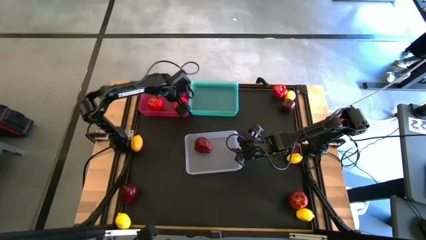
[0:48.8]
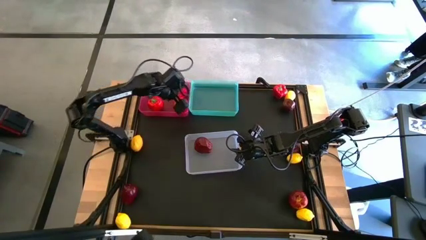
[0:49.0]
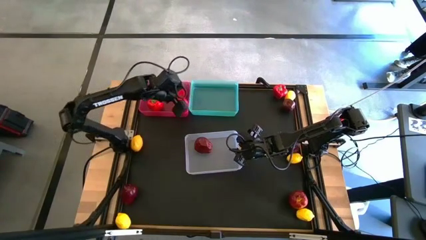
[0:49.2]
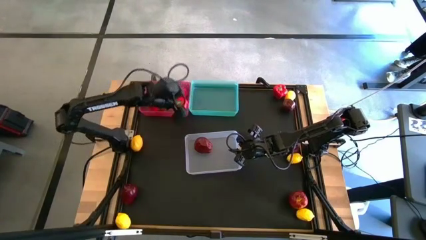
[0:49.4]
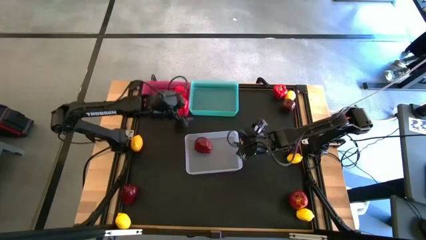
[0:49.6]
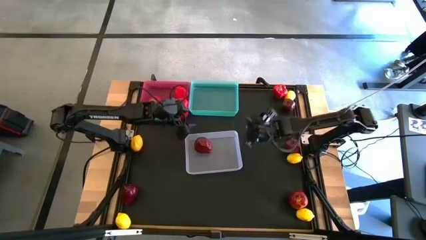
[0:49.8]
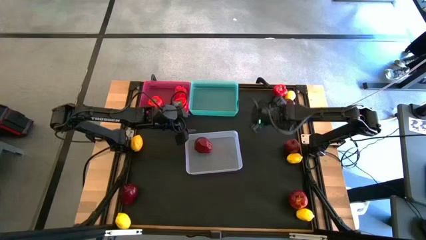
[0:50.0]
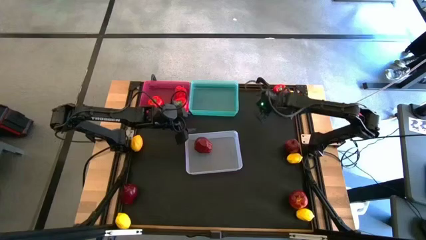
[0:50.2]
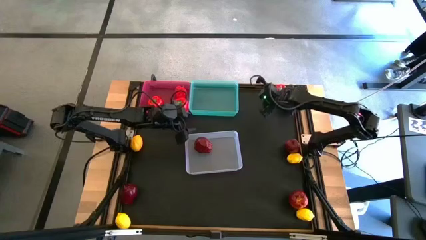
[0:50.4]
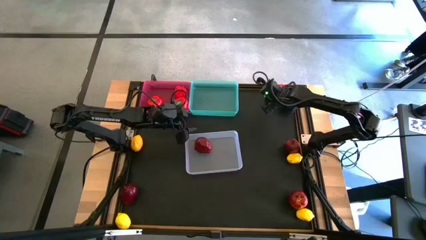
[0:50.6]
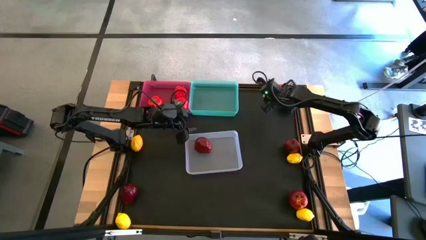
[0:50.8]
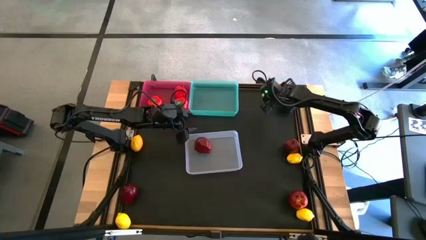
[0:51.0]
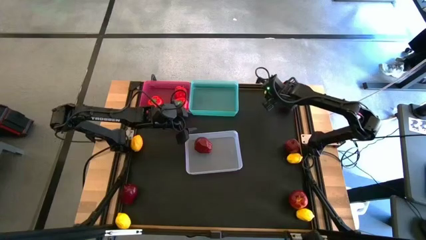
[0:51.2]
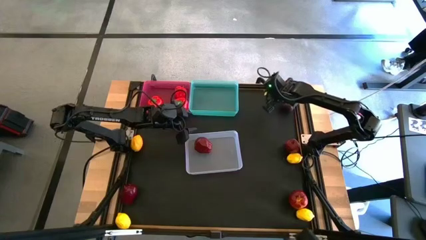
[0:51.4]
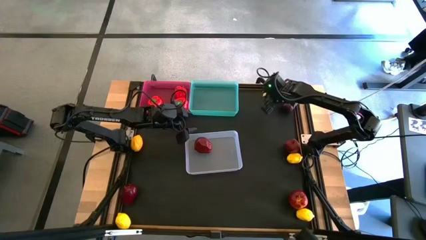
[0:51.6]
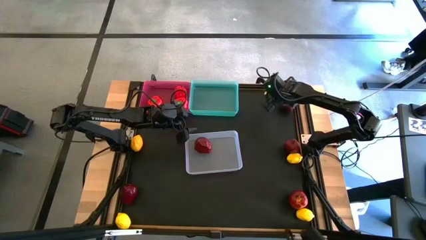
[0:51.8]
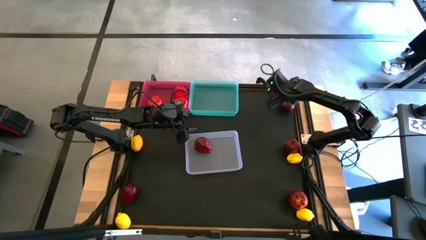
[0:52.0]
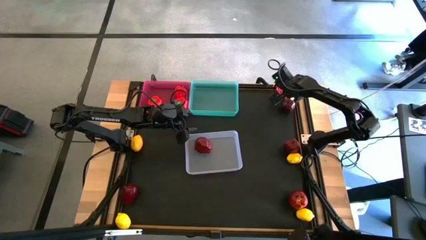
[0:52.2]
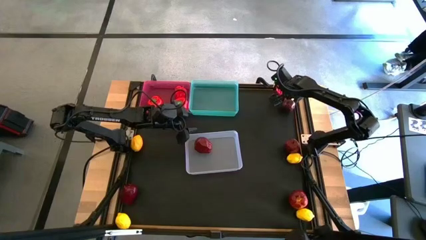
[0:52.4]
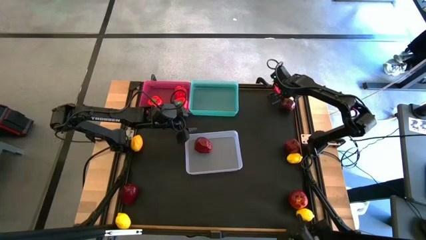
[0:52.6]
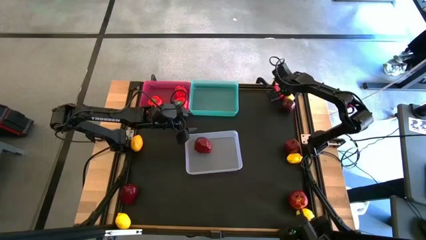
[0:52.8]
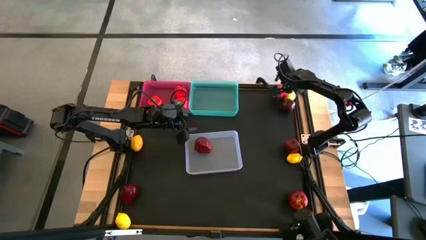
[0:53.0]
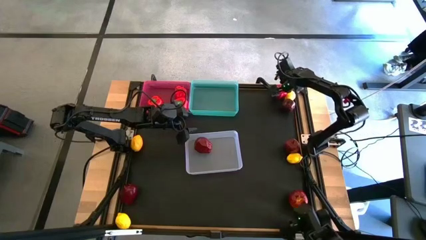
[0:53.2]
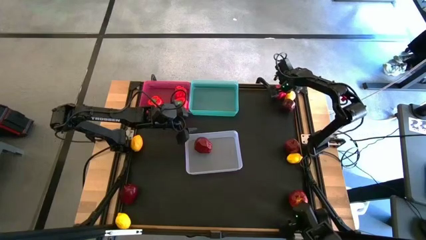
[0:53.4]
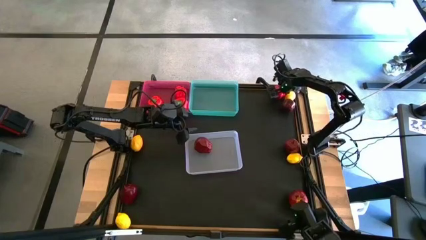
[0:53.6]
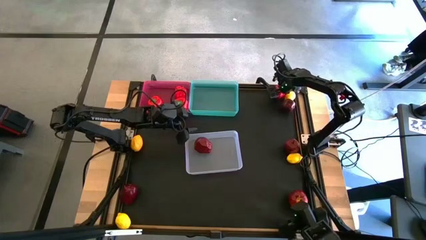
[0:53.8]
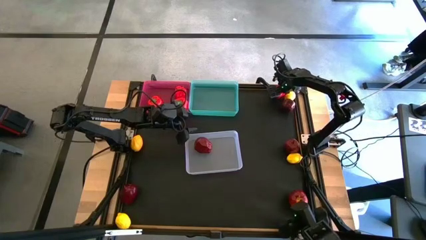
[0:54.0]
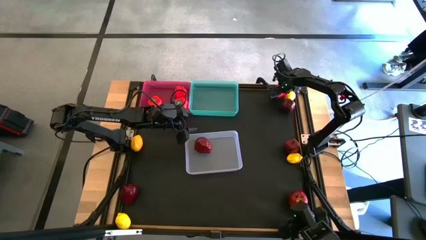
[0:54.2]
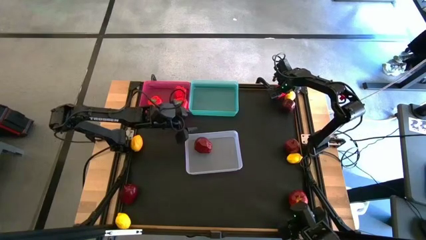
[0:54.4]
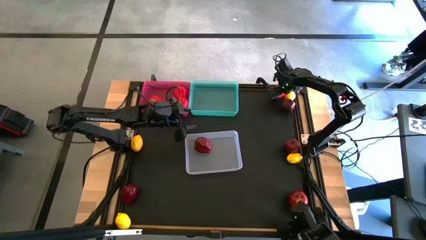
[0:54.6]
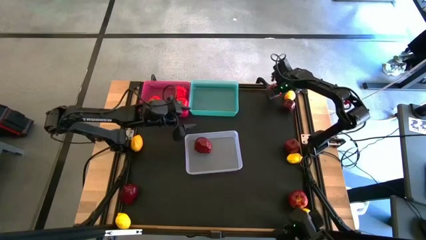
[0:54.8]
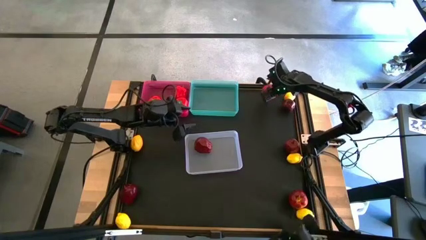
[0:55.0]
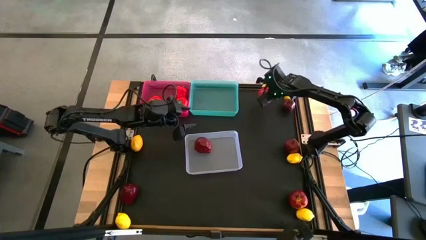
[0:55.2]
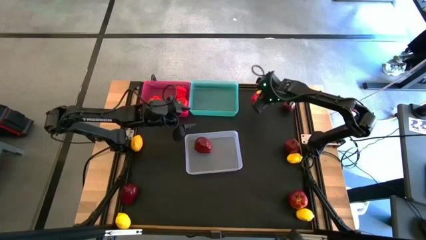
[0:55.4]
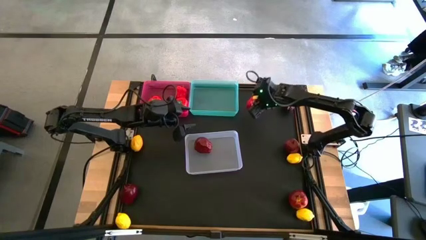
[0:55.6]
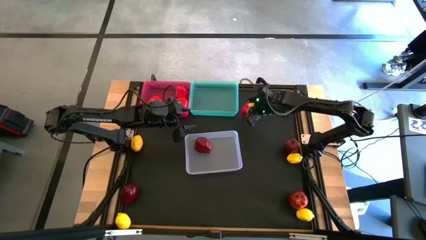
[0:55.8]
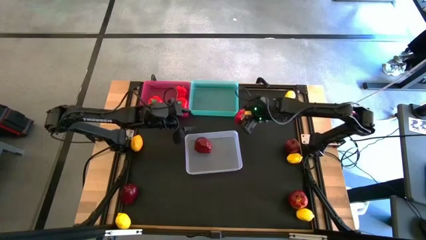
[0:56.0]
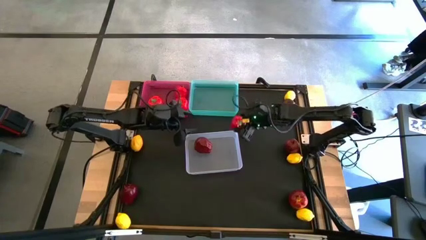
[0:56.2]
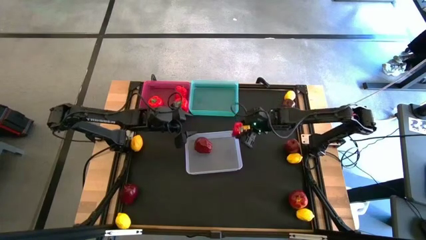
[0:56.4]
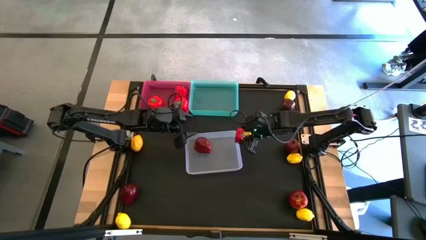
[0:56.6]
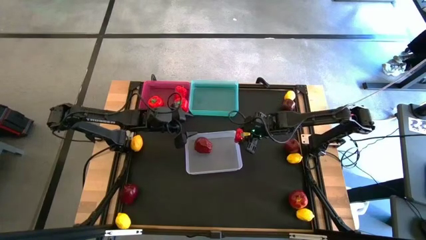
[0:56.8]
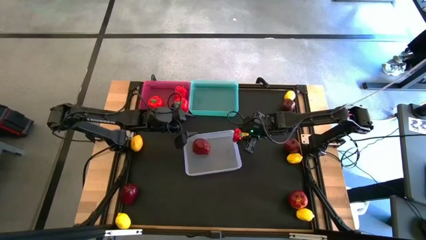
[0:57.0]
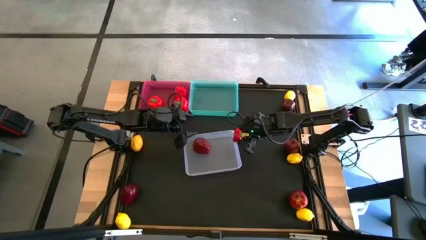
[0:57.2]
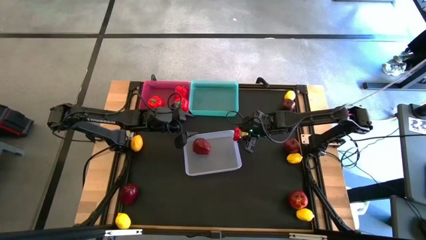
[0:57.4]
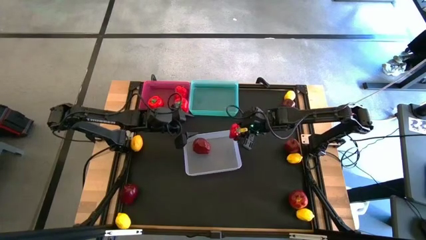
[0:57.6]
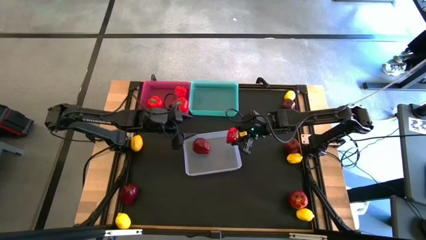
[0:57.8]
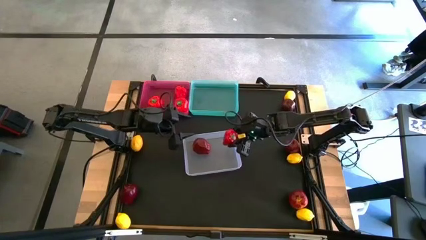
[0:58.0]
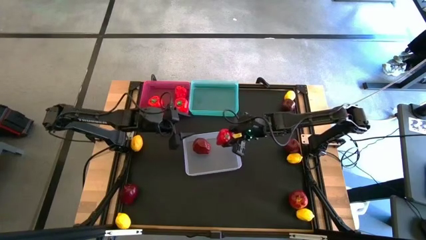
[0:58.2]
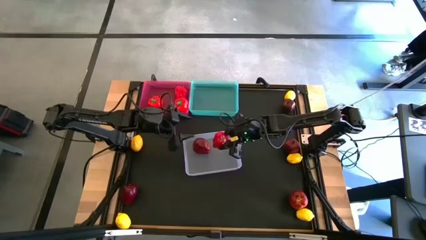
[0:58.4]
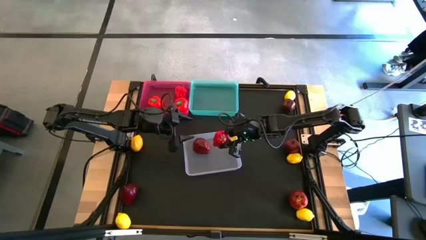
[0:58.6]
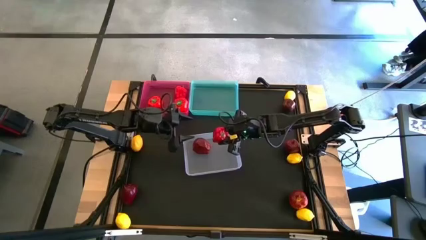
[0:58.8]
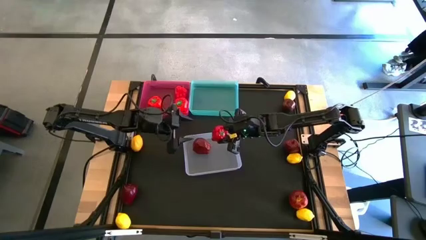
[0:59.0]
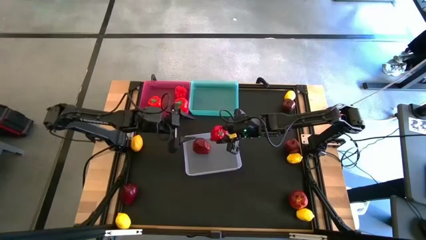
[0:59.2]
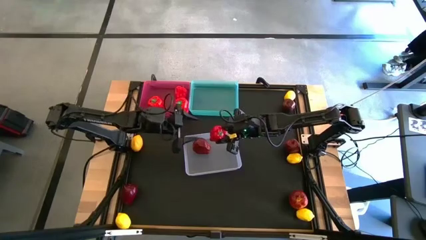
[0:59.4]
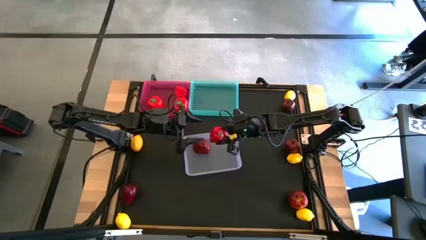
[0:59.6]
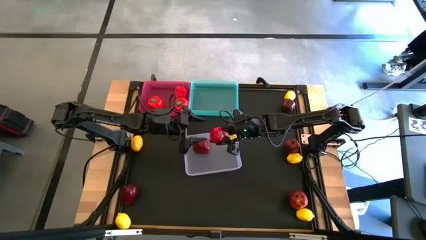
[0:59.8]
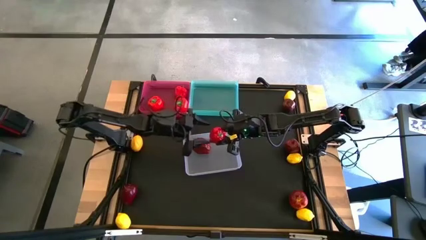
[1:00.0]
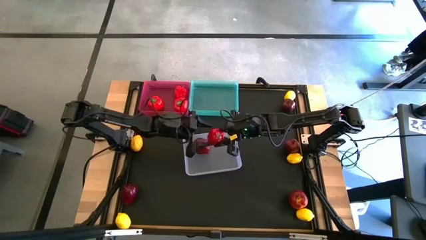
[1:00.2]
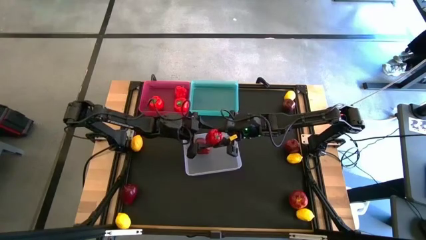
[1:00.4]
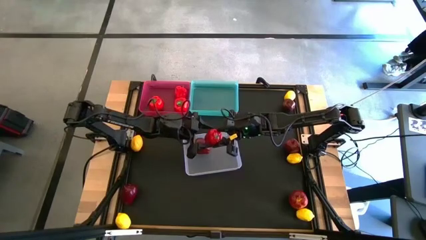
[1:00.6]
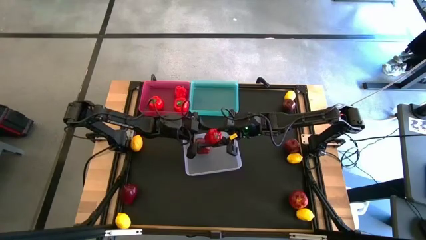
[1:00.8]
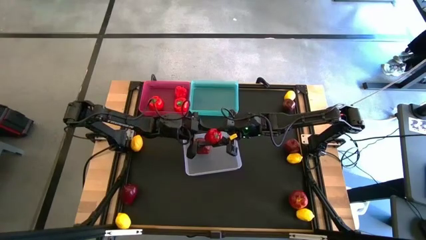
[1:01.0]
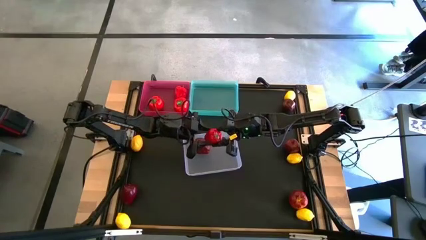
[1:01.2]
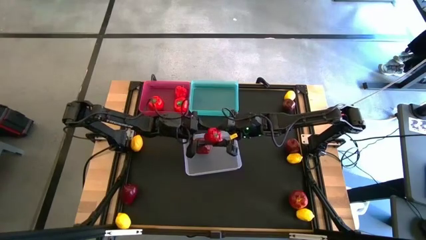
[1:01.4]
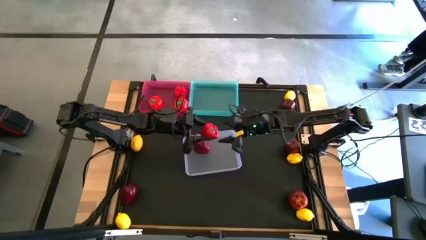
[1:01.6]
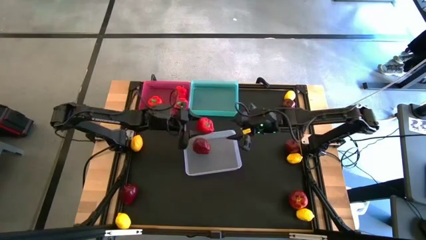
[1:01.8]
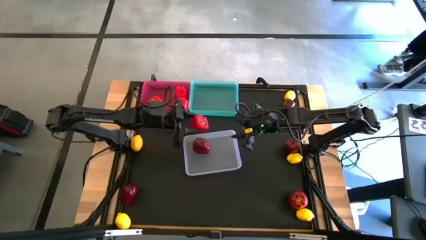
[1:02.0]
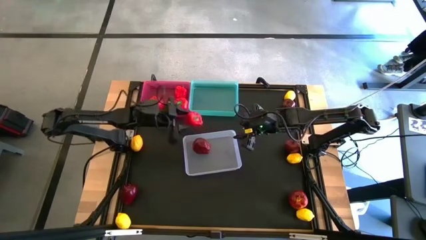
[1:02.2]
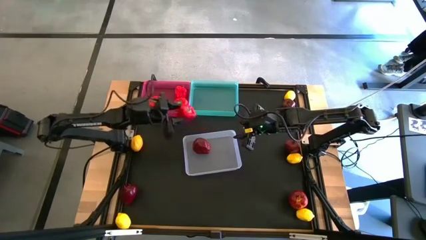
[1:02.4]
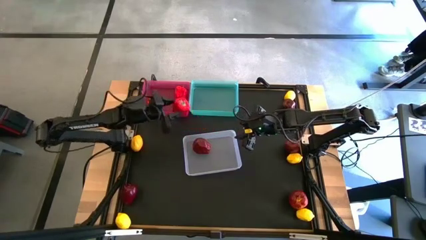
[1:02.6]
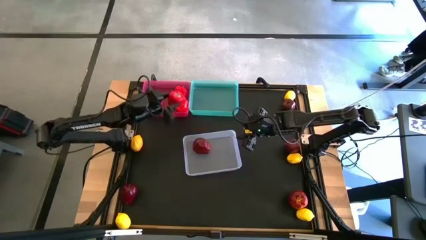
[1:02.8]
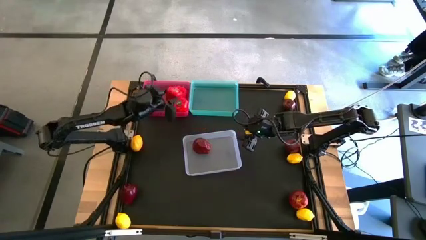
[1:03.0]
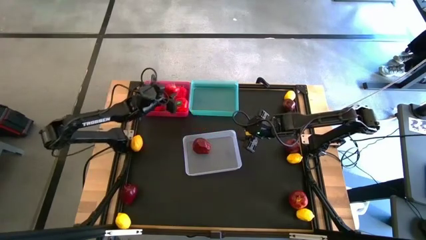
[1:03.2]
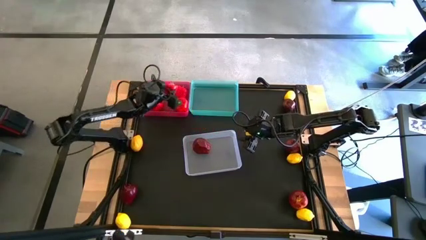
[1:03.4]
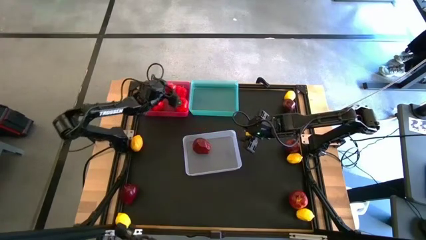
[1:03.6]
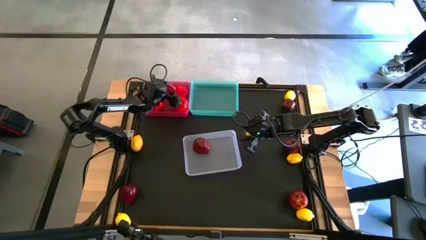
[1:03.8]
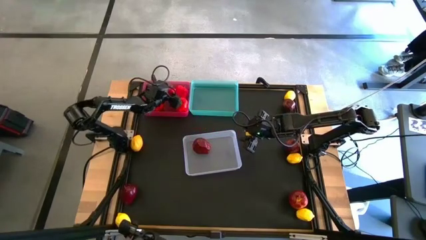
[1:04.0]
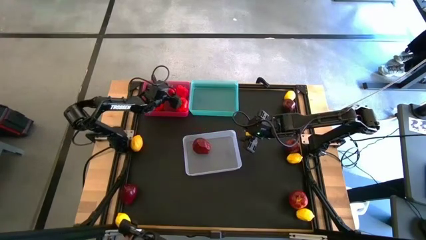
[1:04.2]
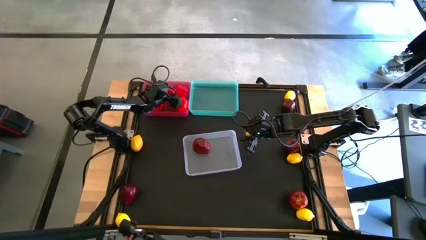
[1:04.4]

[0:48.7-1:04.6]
Task: Sort produce into baskets
Put the red bell pepper into the red bin
